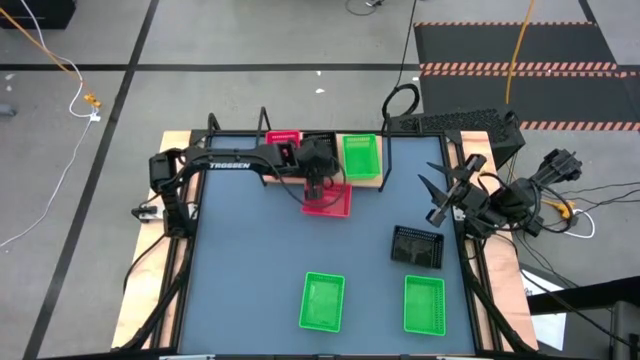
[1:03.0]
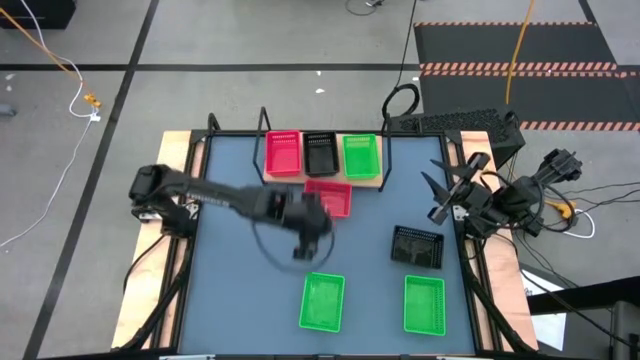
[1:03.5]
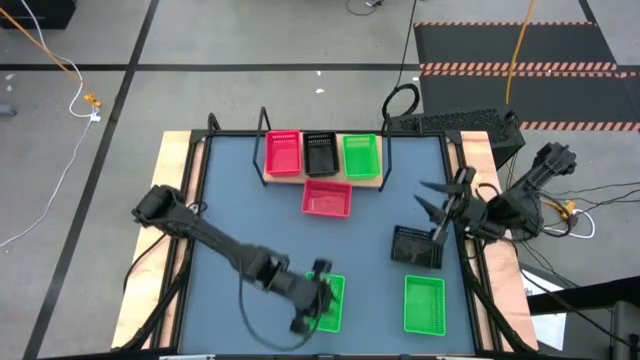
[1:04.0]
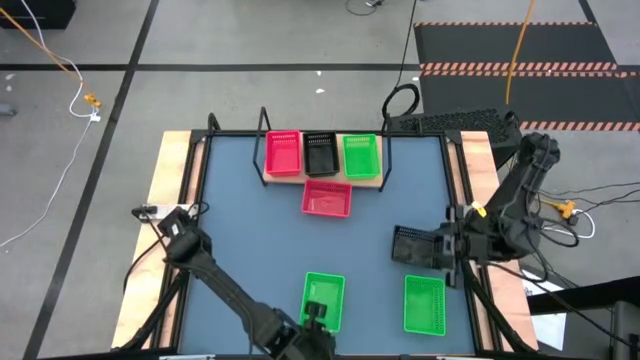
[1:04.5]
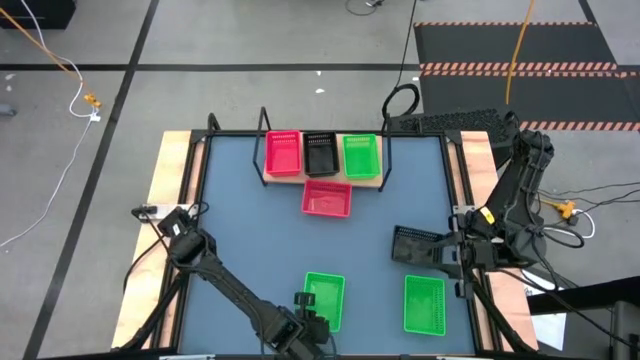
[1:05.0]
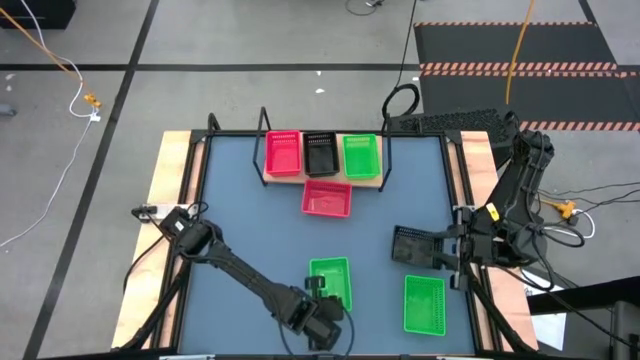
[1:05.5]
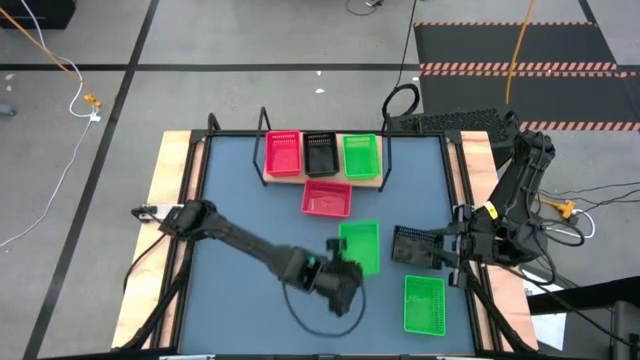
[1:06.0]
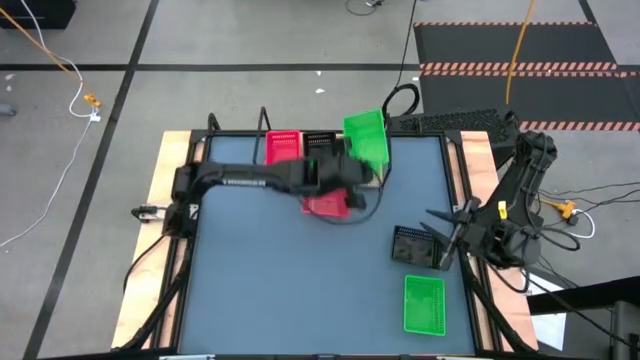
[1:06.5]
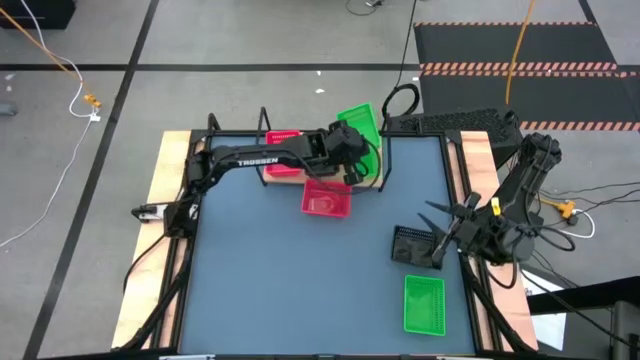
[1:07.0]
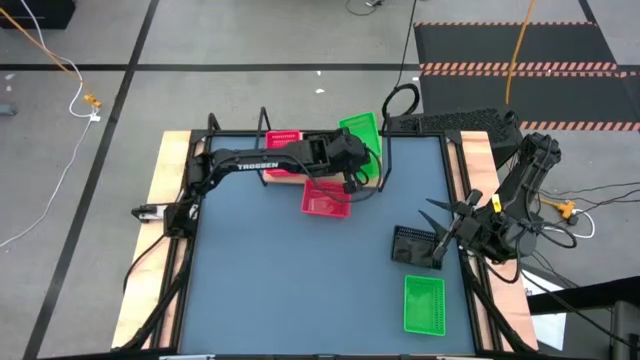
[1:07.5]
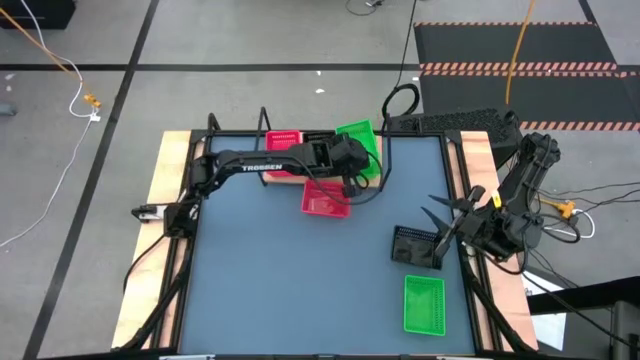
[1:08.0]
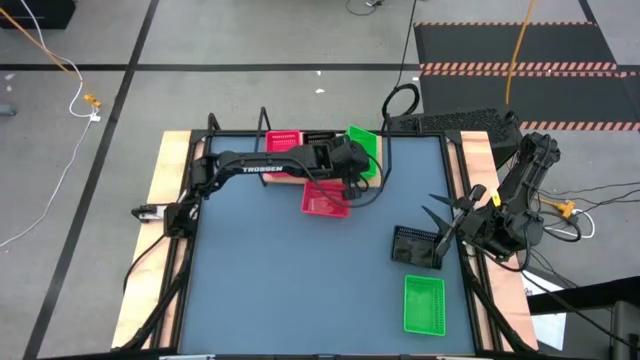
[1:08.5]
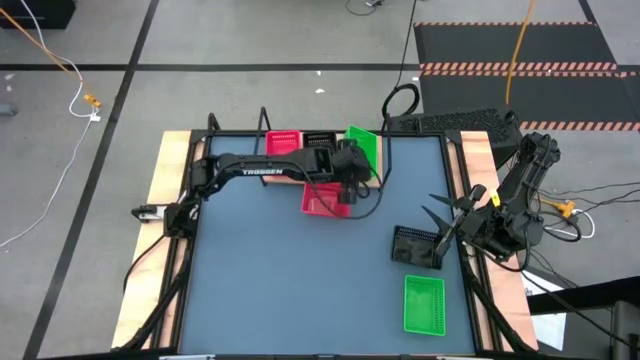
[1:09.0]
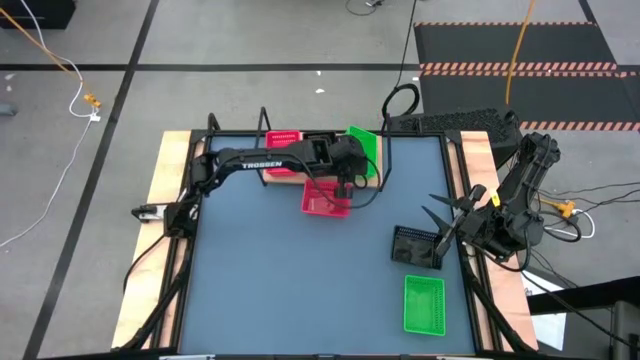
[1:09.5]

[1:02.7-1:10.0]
Task: Stack baskets on shelf by color
Stack the left green basket on the green basket on the shelf

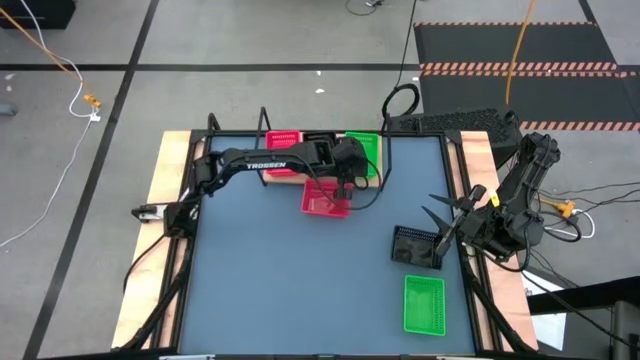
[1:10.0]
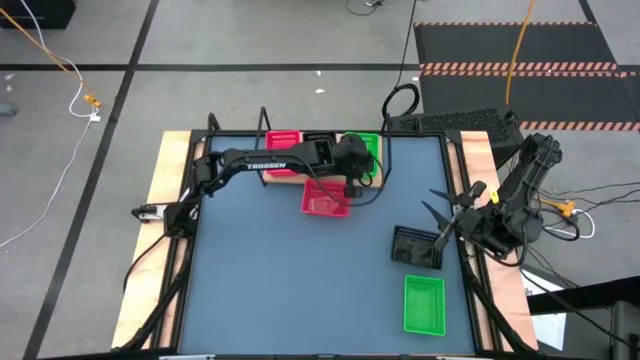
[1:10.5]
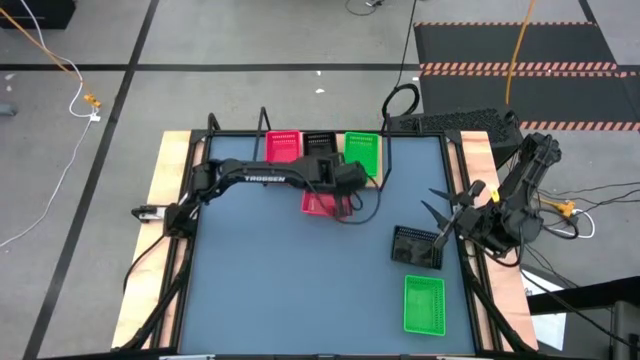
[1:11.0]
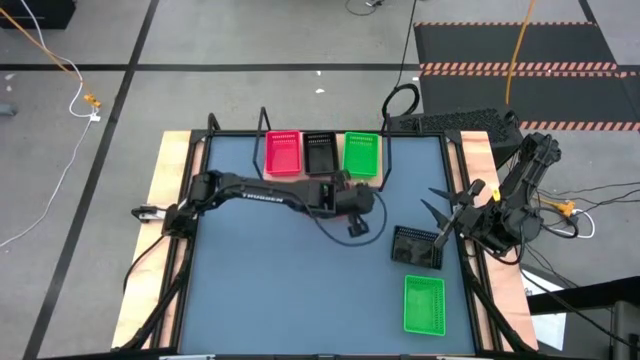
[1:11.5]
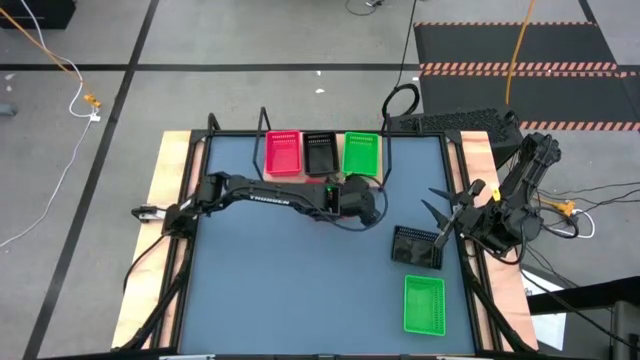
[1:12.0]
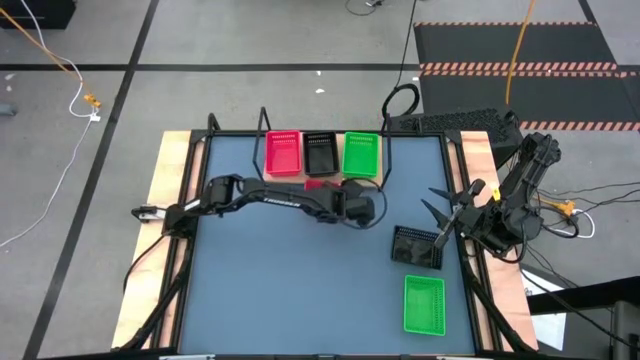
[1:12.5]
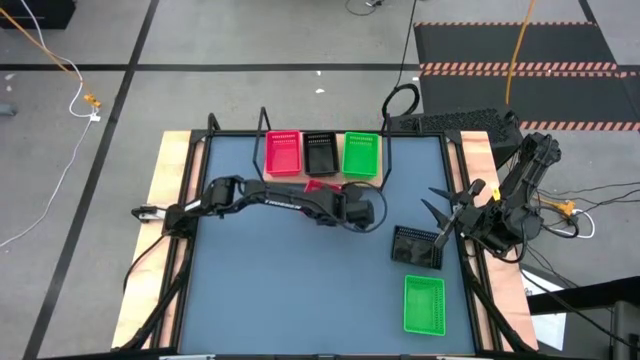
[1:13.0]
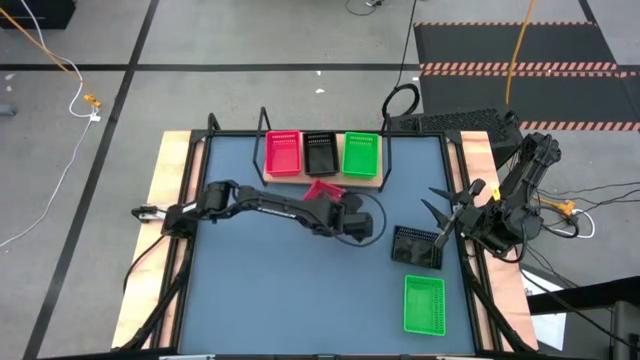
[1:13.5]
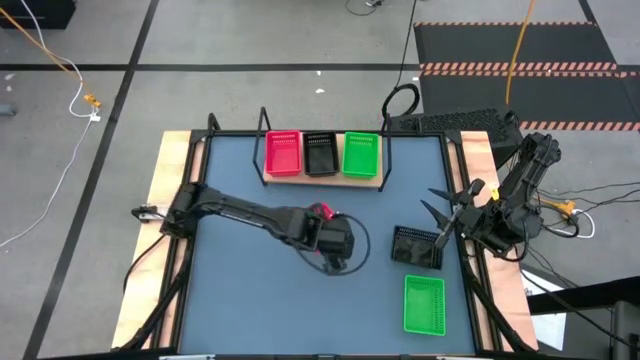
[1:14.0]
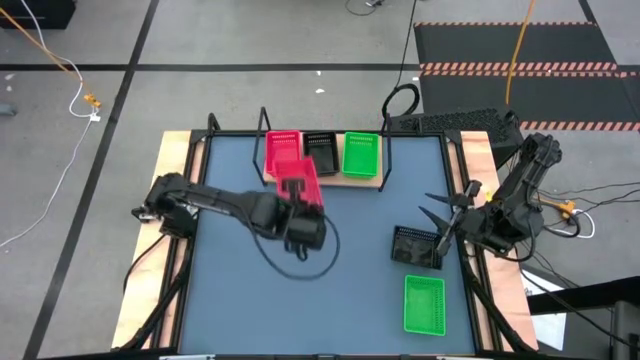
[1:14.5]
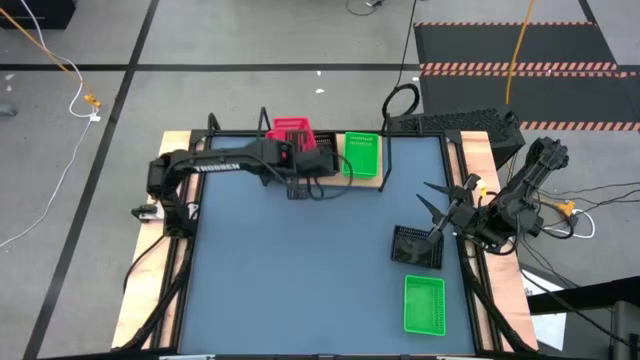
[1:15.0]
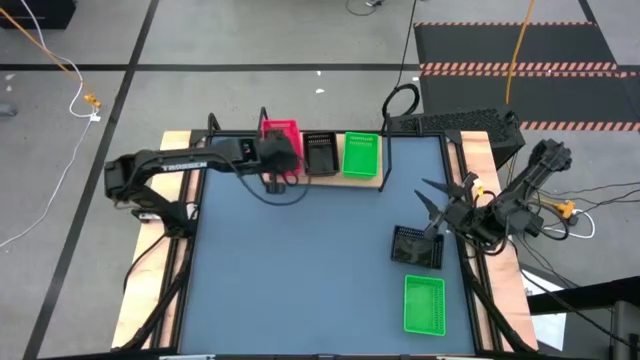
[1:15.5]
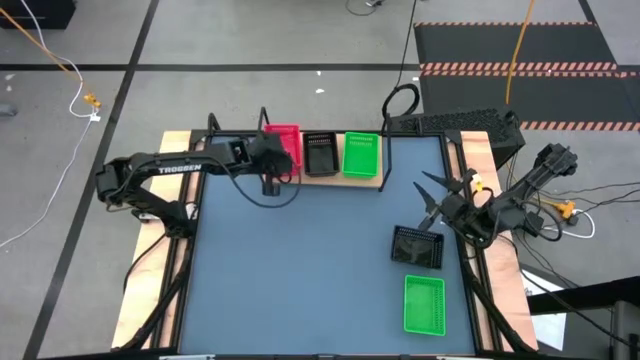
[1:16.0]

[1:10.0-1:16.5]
Stack the red basket on the stacked red baskets on the shelf

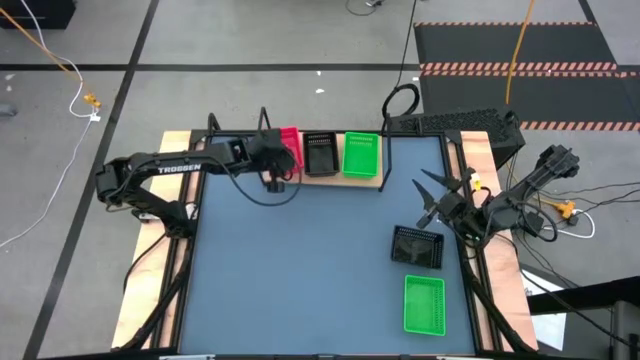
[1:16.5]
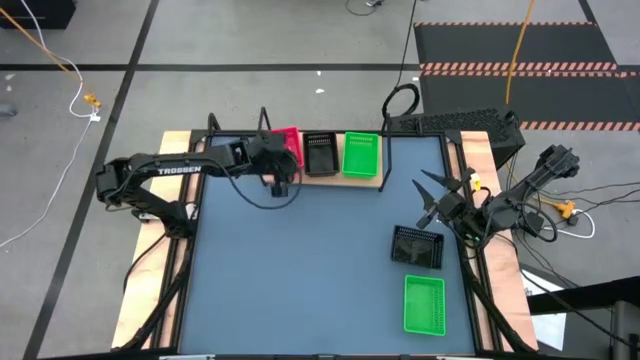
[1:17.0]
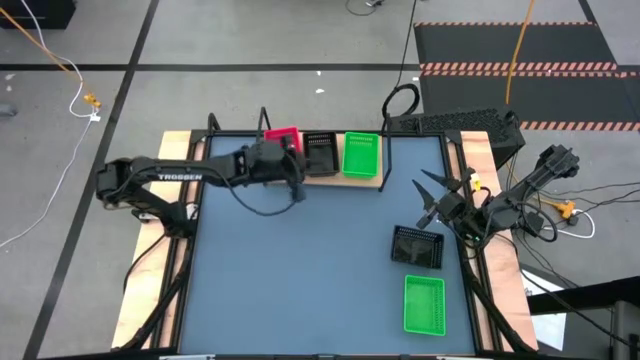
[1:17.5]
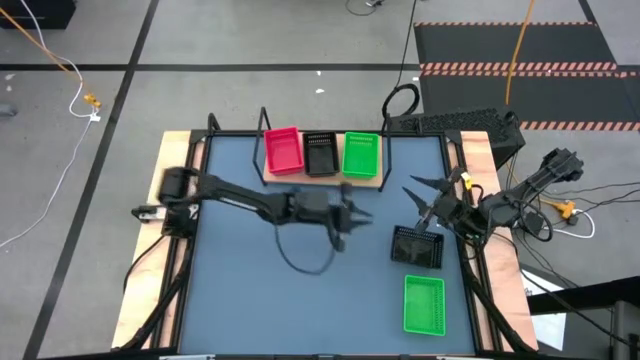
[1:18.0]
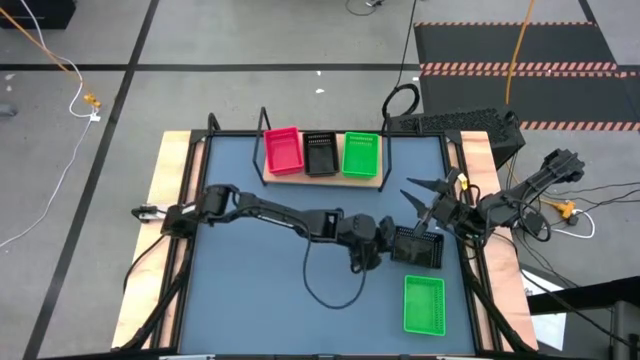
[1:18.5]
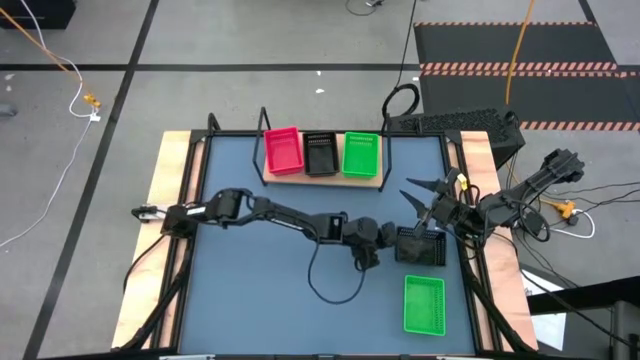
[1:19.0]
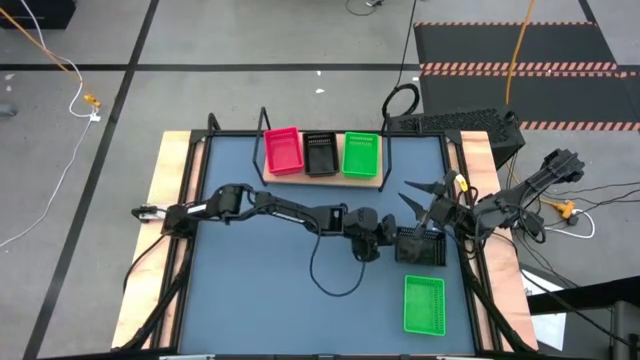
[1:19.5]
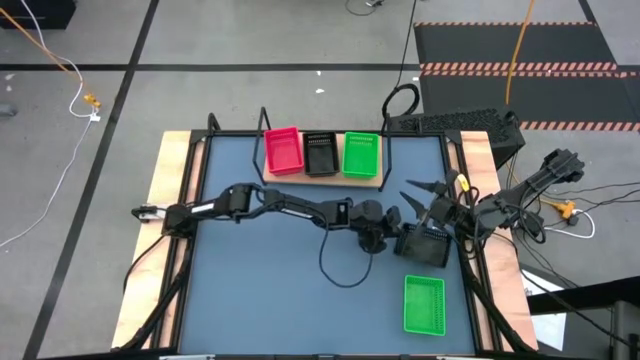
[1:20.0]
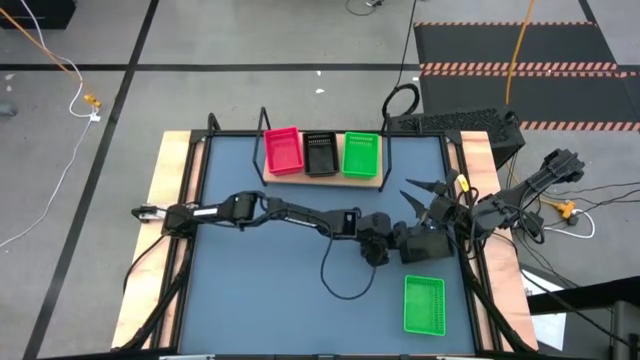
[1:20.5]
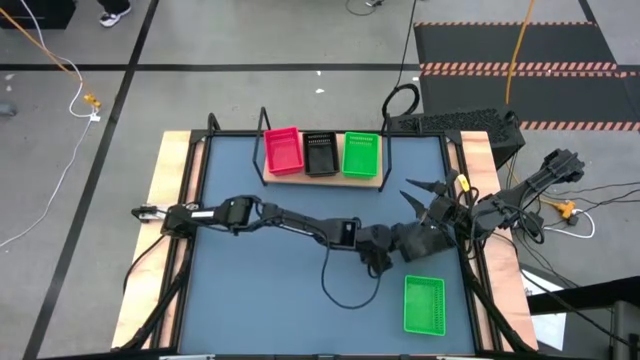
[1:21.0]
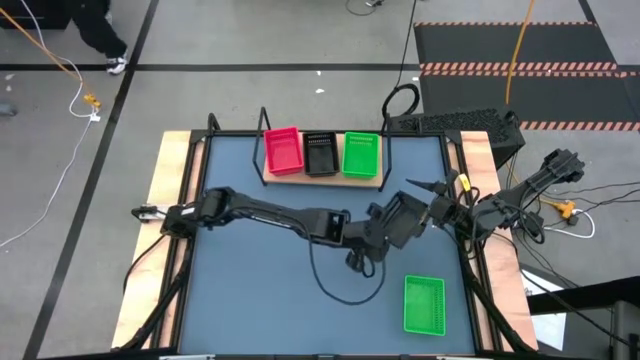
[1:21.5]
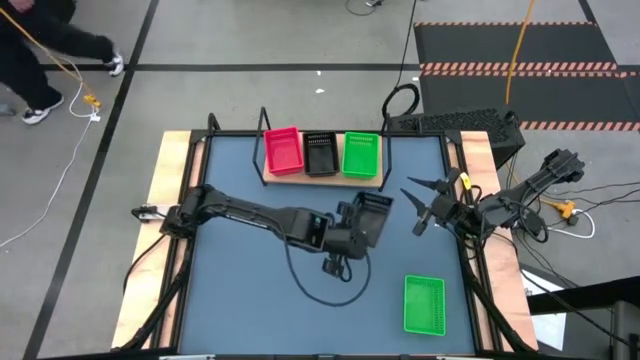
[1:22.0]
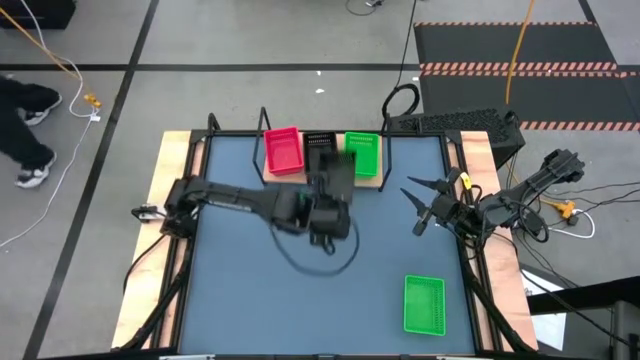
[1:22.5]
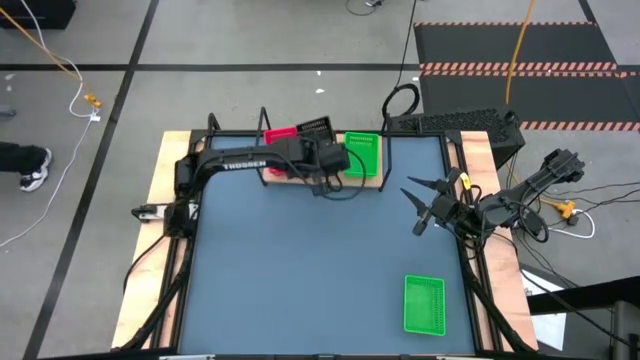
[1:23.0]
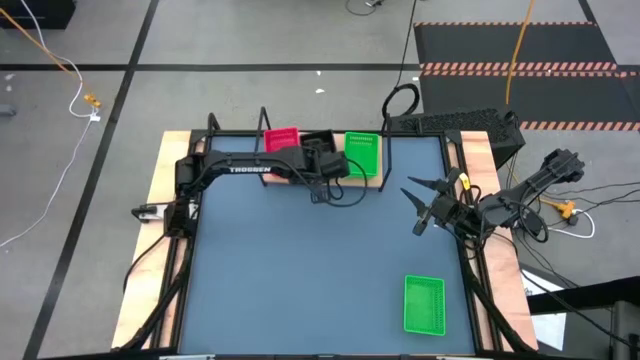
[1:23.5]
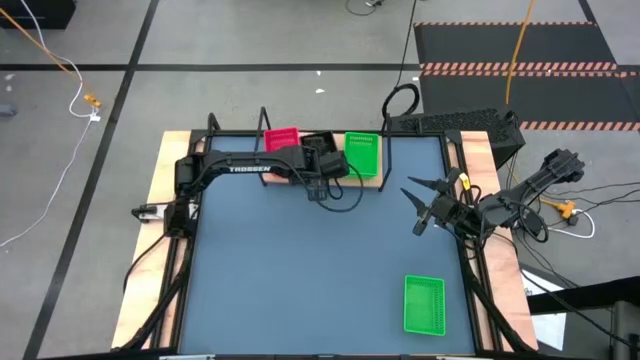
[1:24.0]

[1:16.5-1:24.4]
Stack the black basket on the stacked black baskets on the shelf

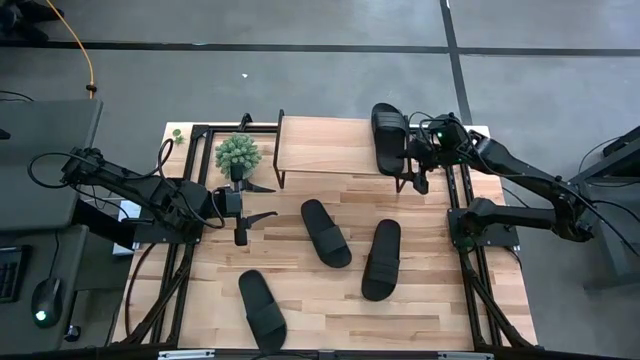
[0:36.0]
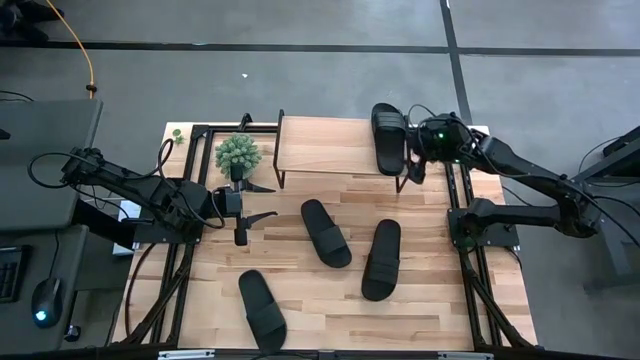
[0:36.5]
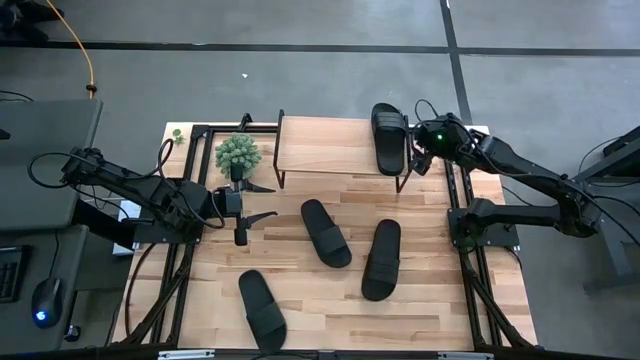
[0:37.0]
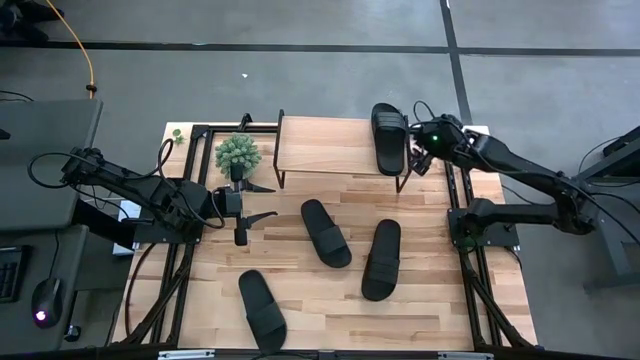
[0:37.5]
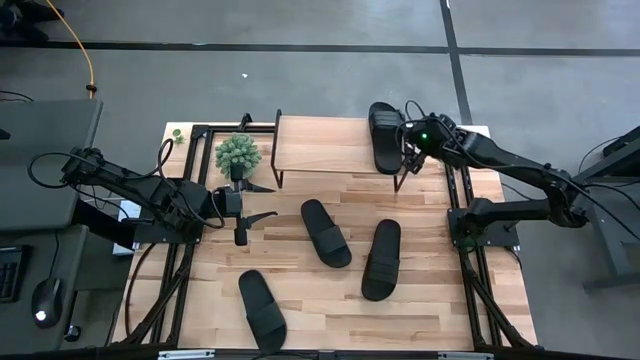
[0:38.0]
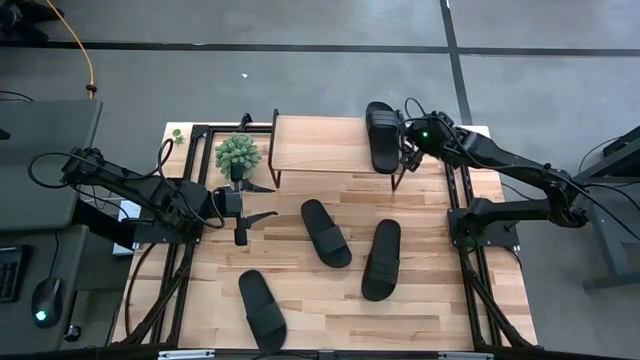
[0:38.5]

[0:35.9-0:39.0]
Task: Pick and place slides into the shelf
Adjust the shelf
